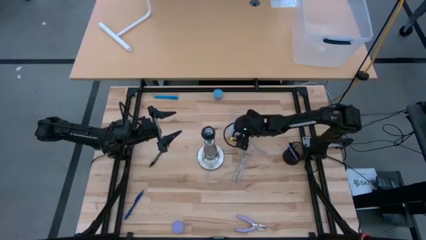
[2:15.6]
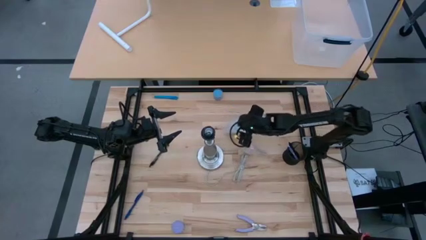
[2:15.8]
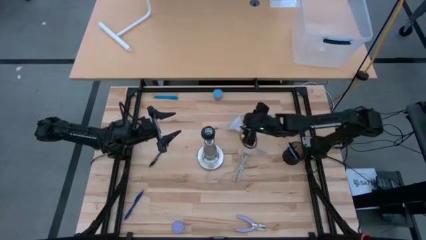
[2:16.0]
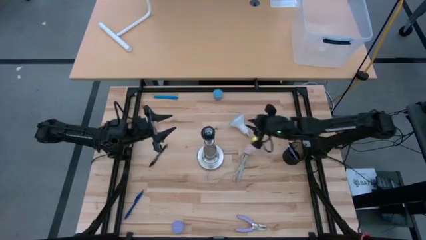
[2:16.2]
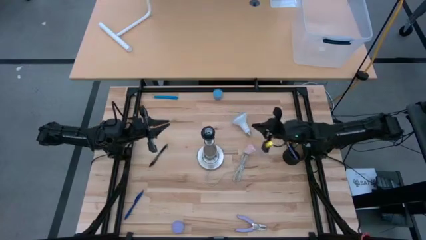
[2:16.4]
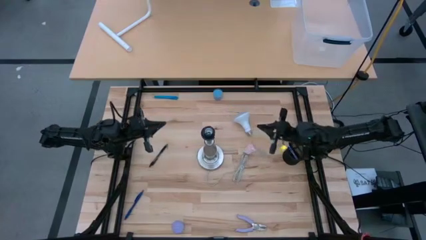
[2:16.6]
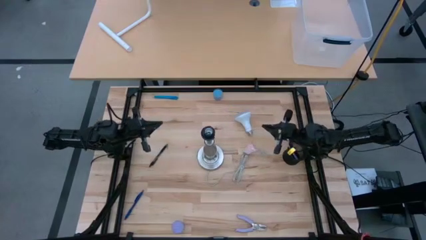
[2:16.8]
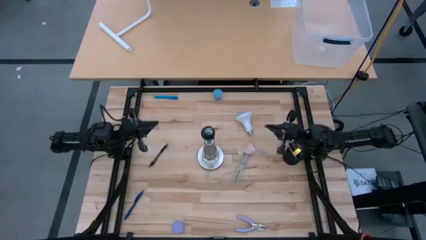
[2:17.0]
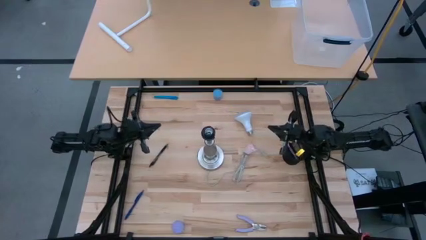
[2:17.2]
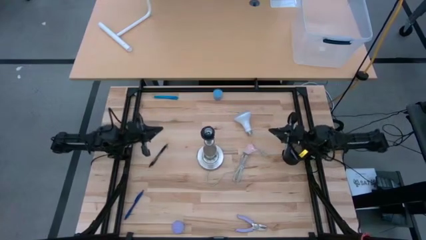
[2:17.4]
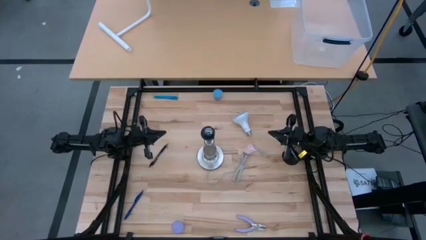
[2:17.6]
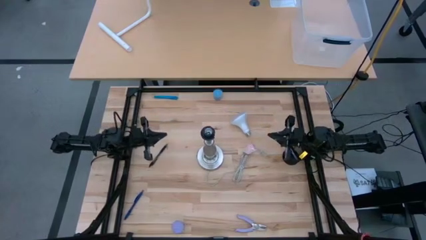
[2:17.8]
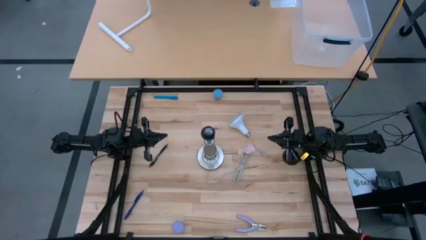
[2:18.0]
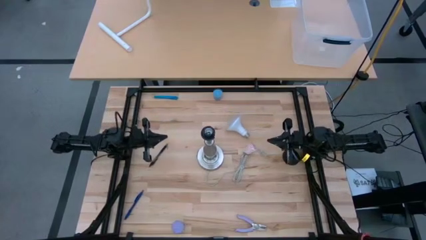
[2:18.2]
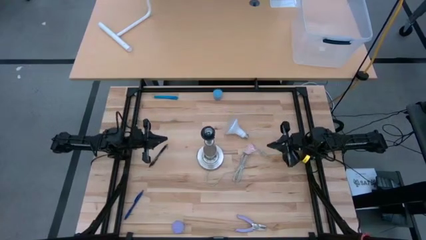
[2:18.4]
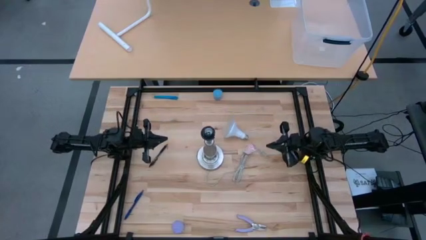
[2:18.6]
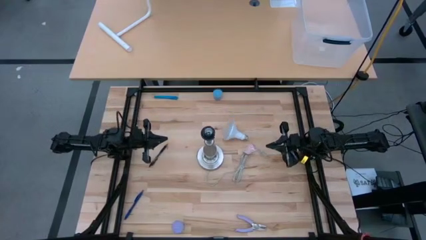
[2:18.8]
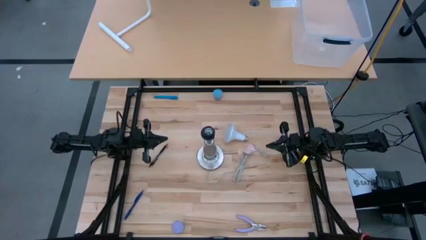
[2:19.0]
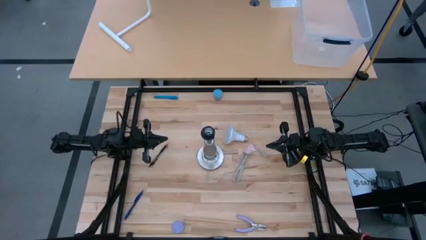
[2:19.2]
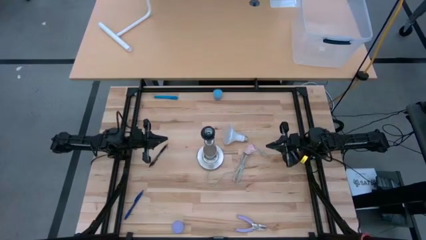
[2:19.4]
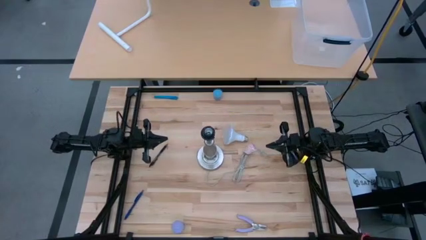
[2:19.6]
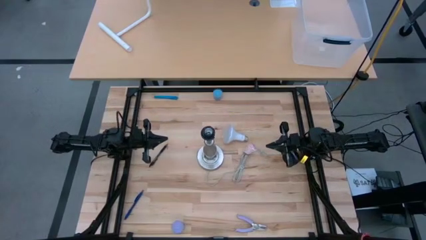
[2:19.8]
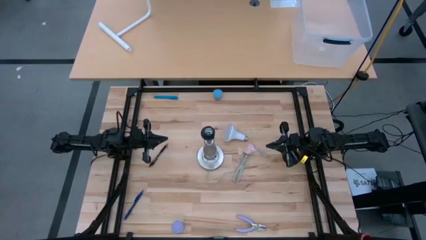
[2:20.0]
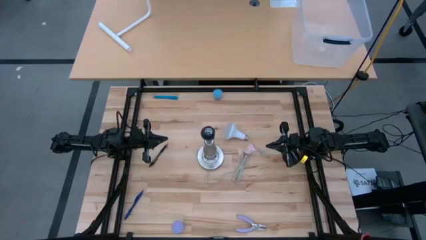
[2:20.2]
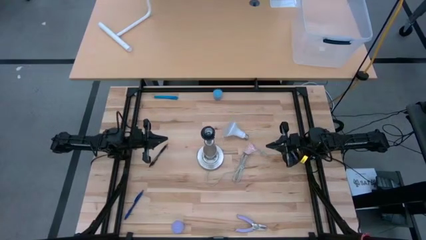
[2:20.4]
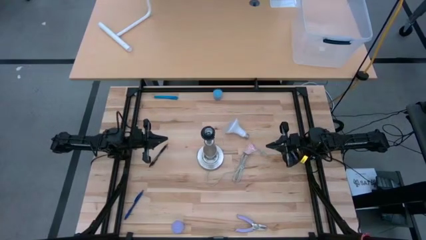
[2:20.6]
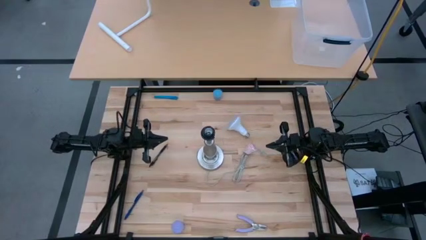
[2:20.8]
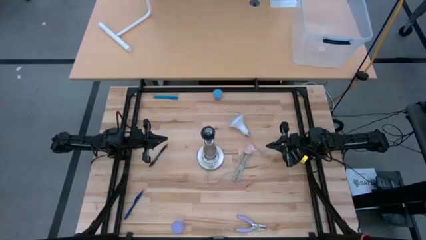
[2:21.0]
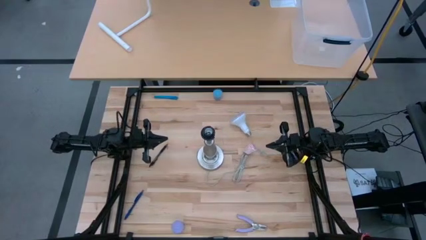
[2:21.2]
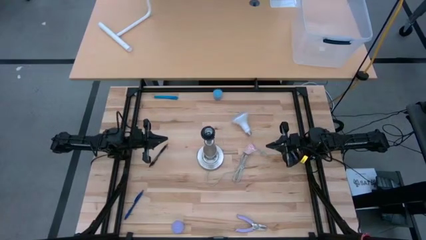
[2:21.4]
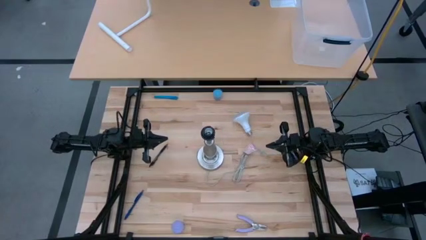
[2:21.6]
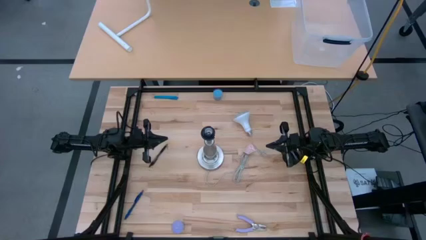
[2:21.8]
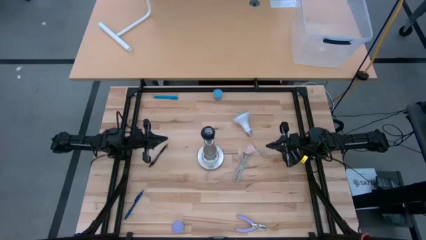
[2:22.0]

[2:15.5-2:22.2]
Task: Screw lightbulb
Return to Home Position

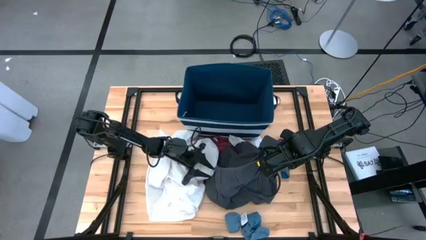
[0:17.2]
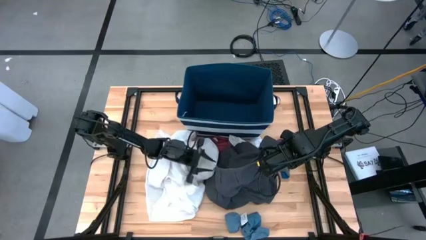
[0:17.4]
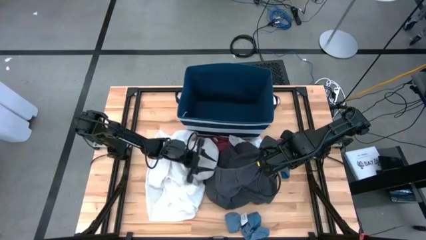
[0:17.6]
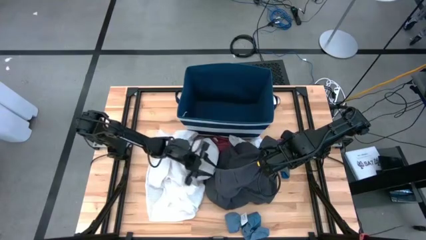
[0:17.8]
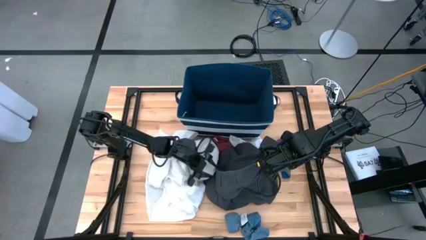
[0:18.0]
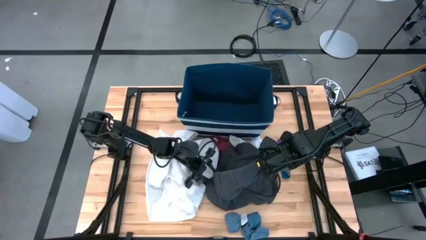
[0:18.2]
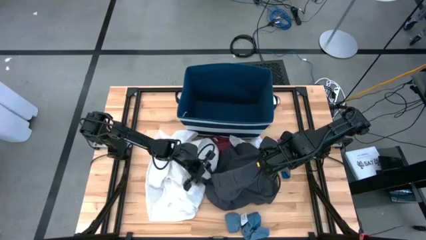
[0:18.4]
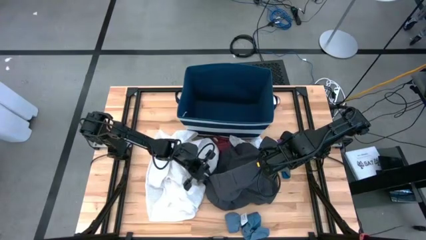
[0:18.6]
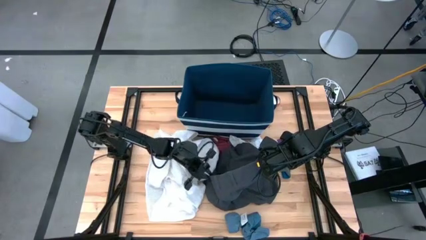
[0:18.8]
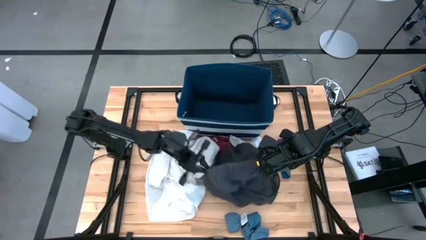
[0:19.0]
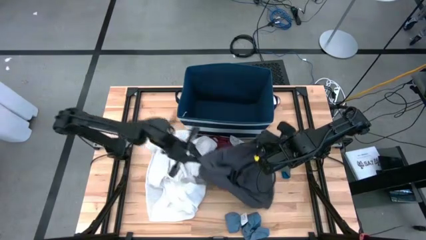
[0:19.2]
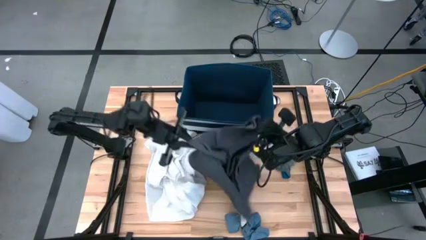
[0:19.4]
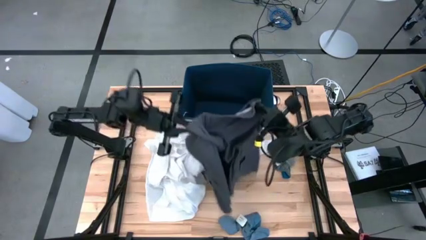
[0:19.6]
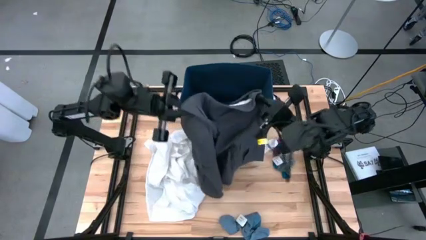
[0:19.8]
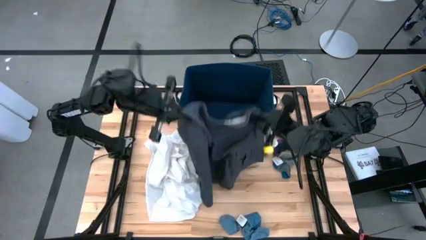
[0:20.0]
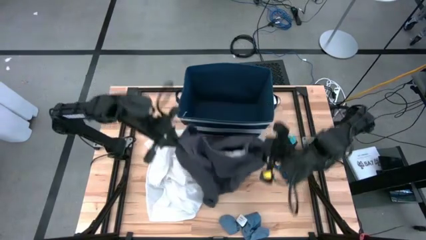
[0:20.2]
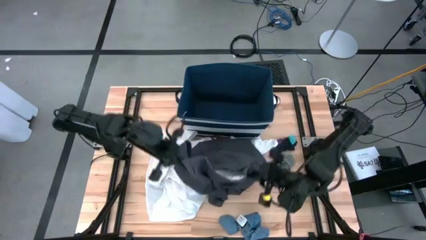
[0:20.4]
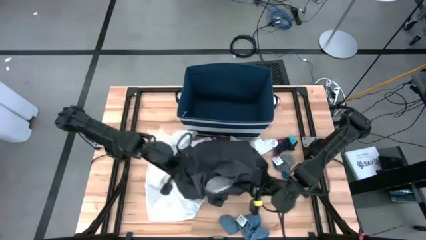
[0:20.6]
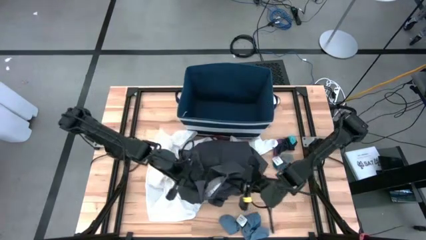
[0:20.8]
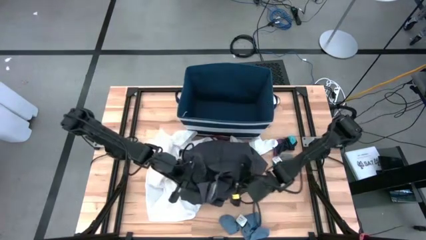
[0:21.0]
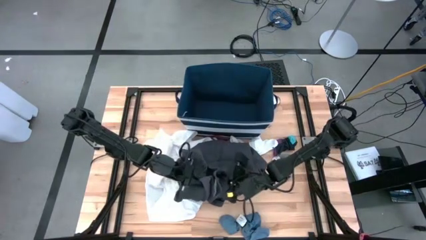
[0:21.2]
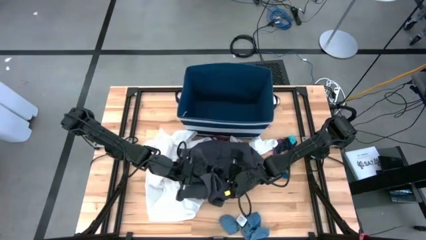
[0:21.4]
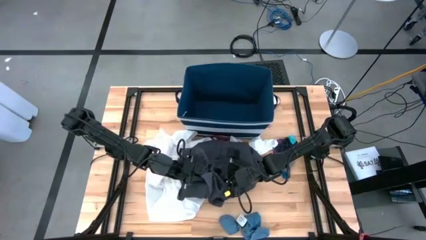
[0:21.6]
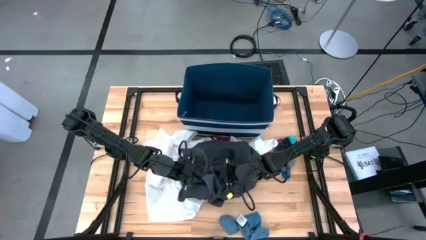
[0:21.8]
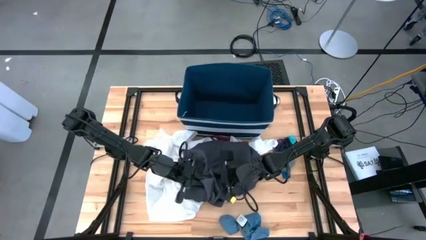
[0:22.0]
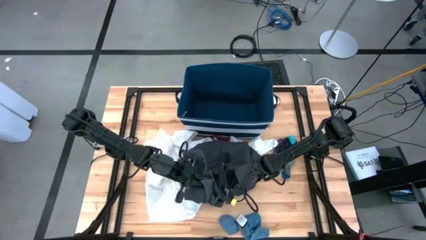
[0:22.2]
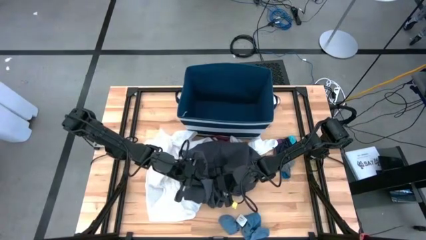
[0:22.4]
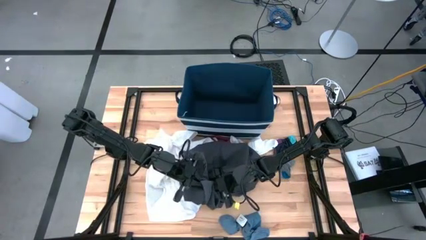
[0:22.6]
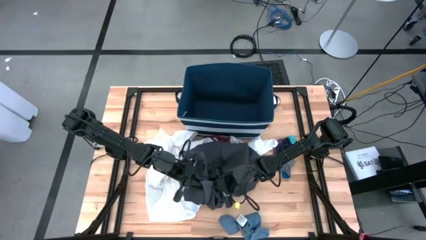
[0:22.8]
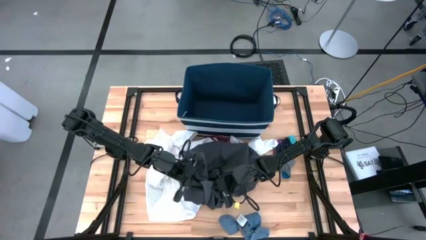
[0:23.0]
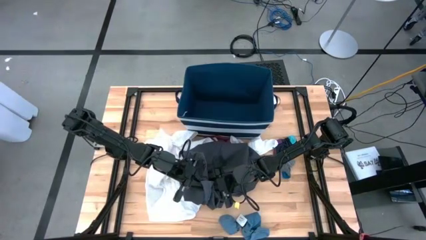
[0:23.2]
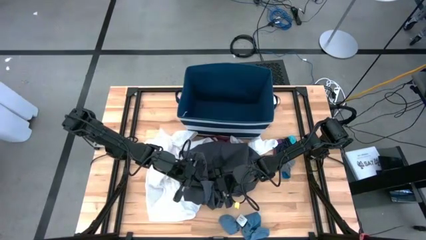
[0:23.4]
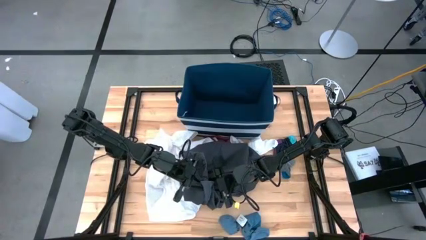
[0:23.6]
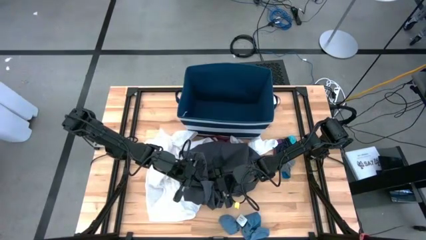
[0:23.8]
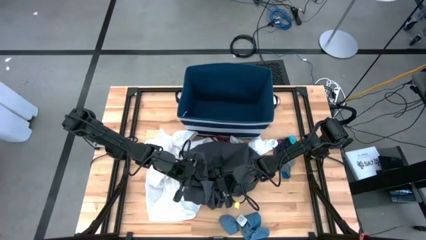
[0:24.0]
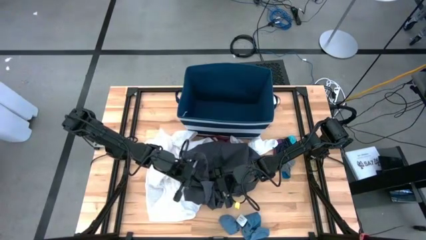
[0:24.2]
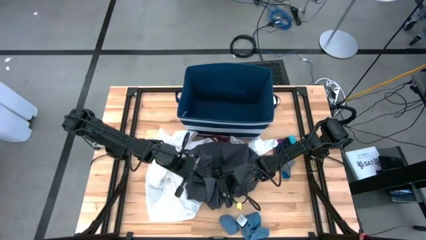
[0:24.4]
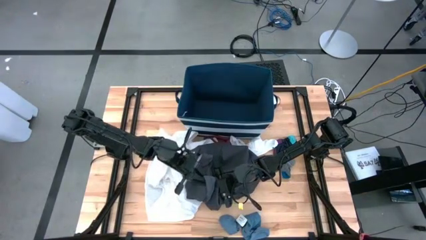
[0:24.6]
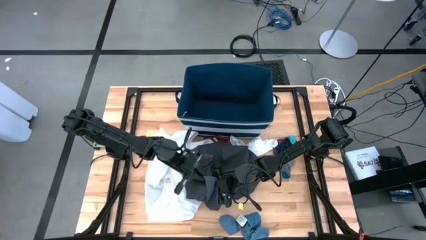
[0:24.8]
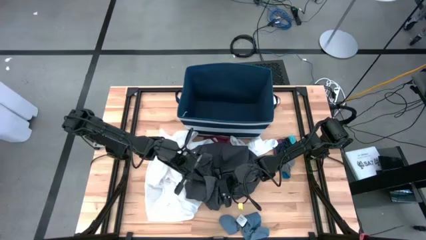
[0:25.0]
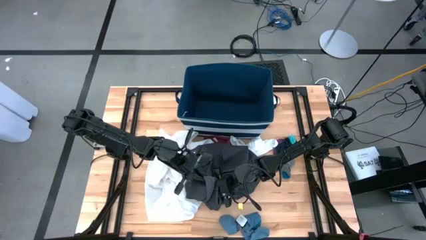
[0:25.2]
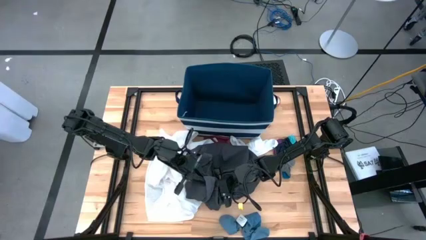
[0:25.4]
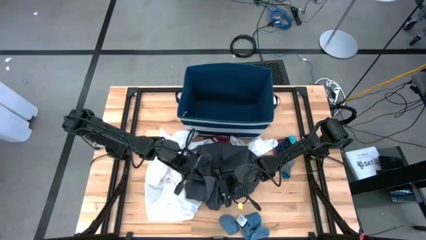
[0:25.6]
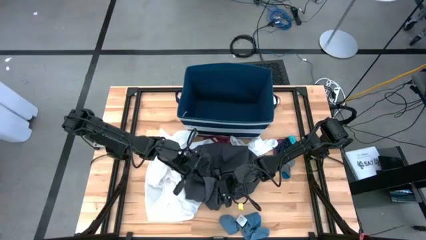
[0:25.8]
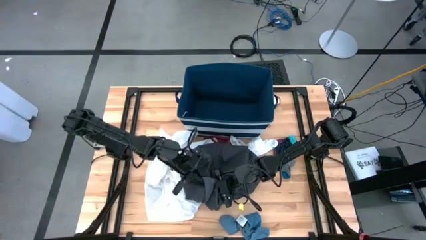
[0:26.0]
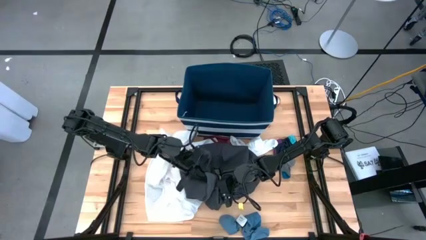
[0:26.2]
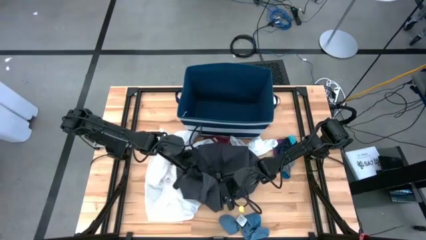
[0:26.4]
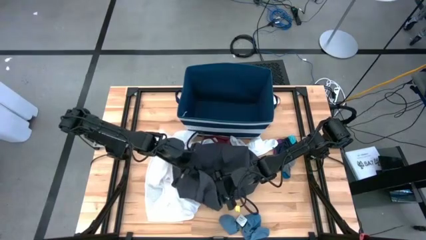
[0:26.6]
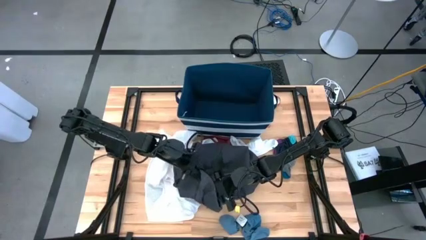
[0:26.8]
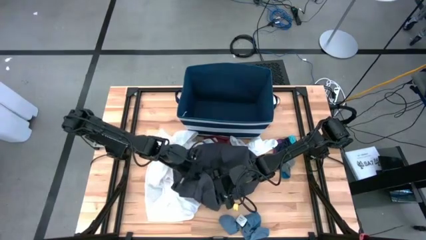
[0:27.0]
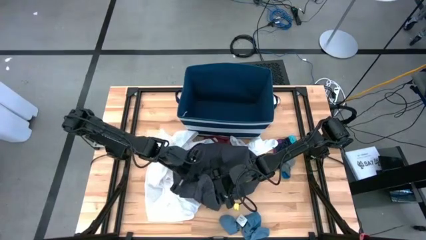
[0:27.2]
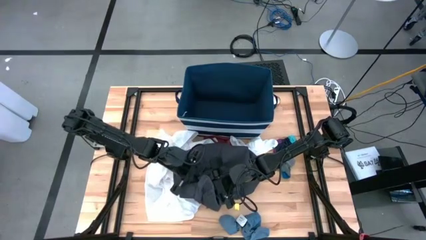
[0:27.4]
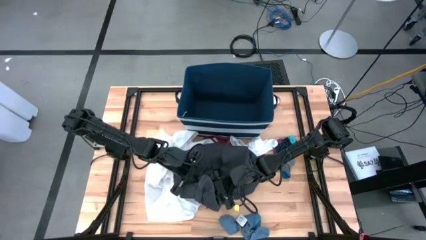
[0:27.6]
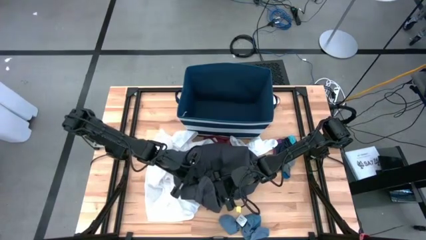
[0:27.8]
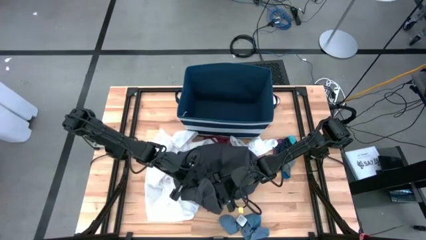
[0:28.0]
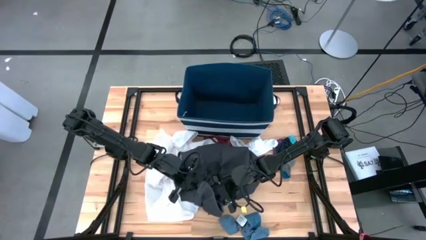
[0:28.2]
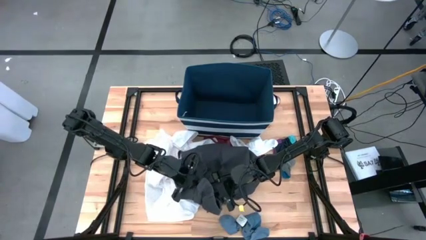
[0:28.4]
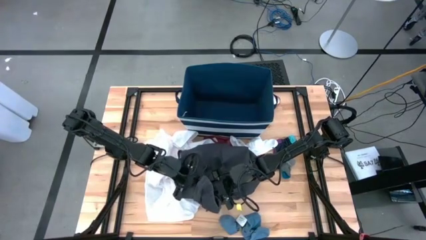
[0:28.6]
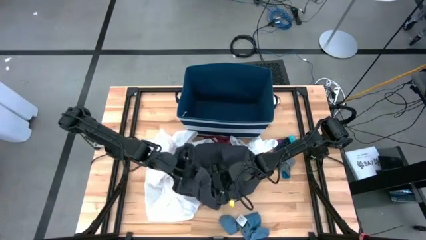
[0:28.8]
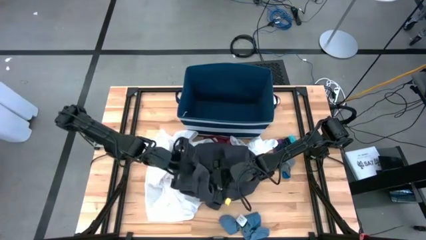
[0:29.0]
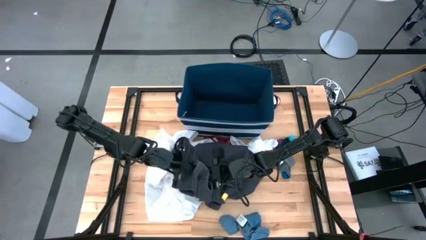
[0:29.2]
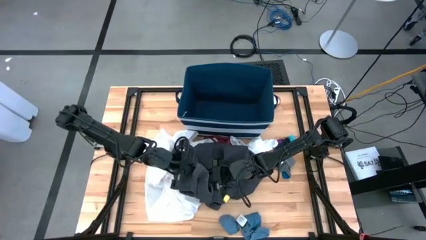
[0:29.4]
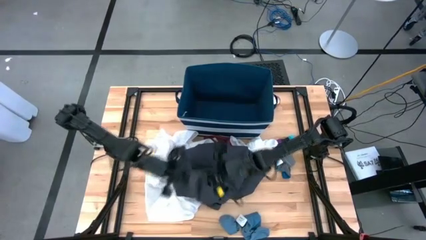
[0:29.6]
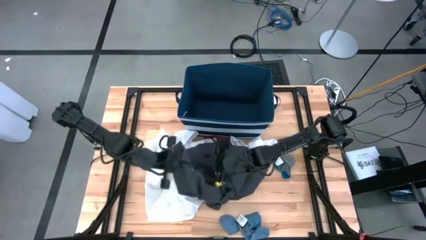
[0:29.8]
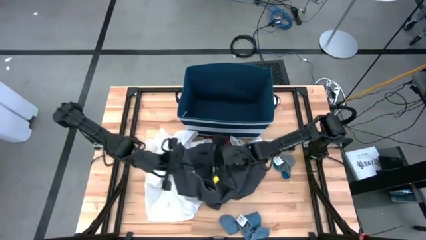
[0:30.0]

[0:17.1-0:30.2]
Task: Sort clothes
Put the black shorts into the blue laundry organizer
